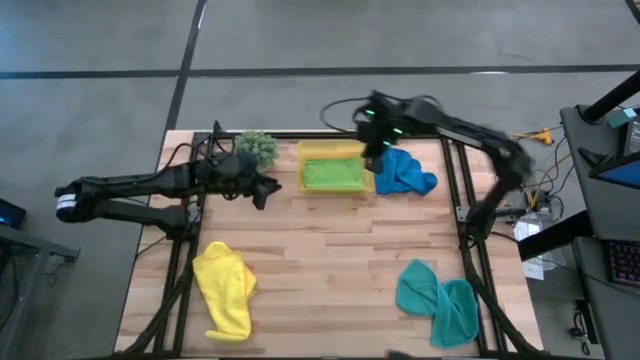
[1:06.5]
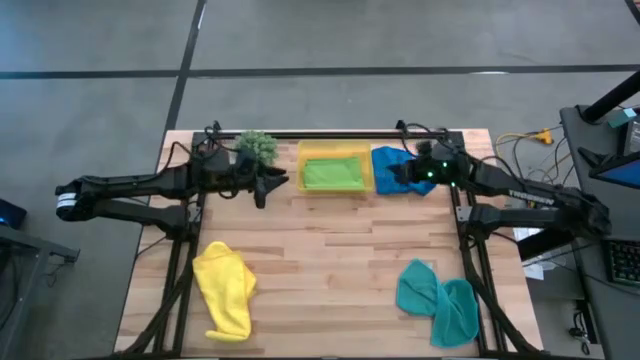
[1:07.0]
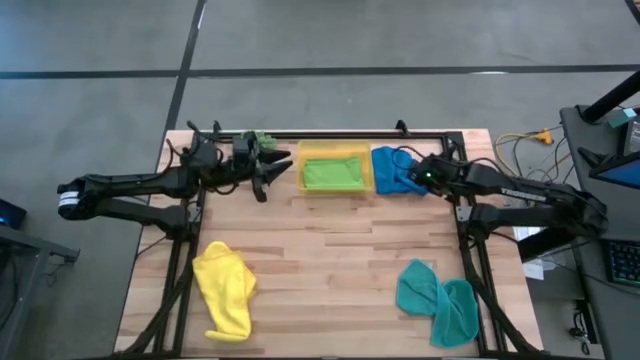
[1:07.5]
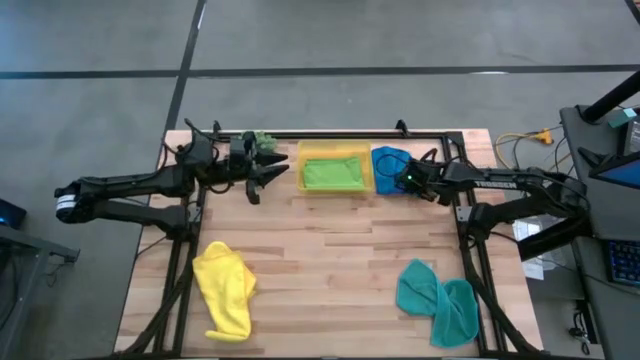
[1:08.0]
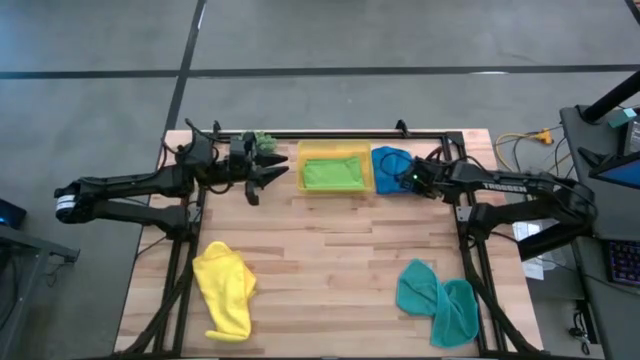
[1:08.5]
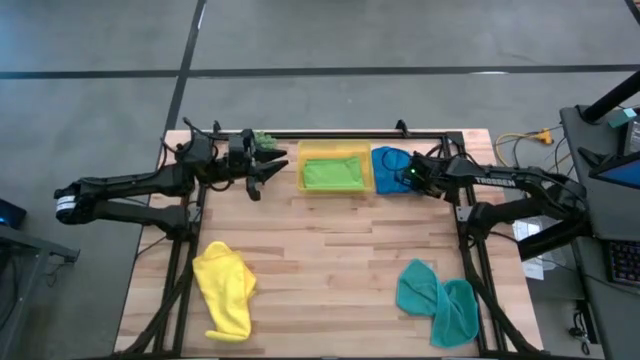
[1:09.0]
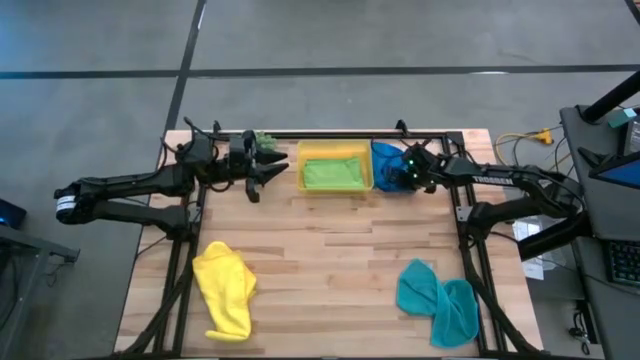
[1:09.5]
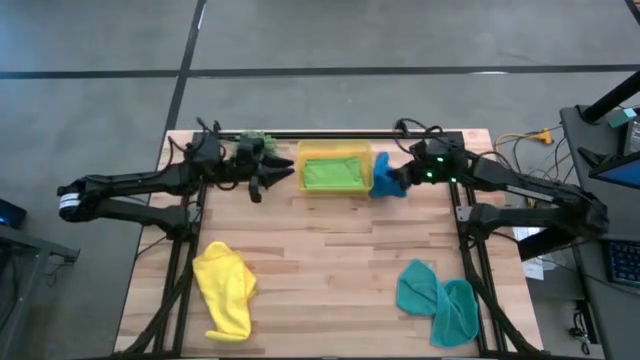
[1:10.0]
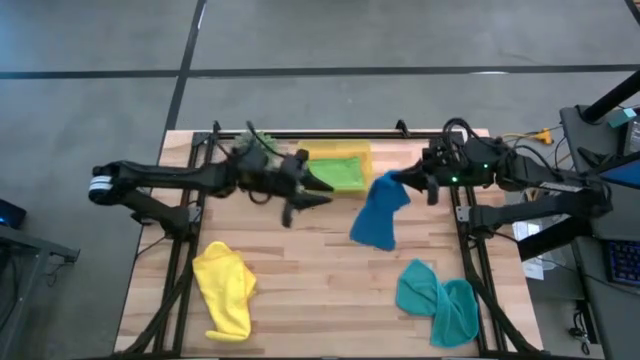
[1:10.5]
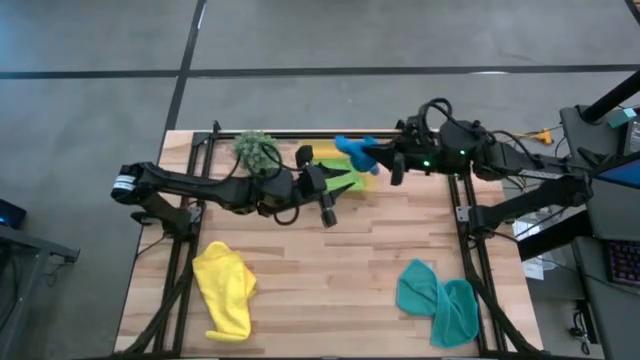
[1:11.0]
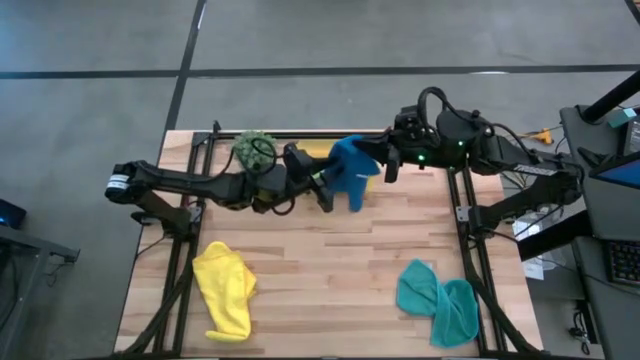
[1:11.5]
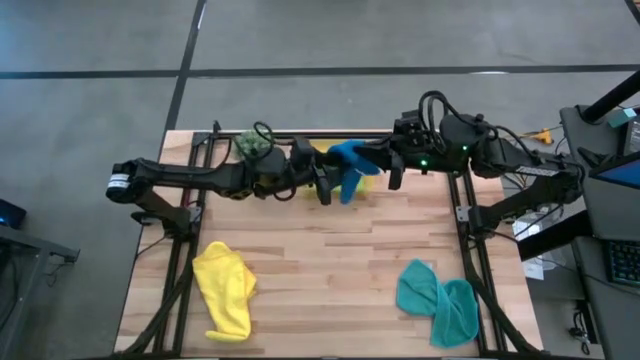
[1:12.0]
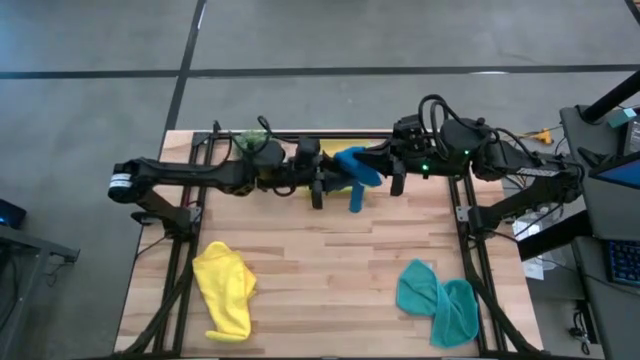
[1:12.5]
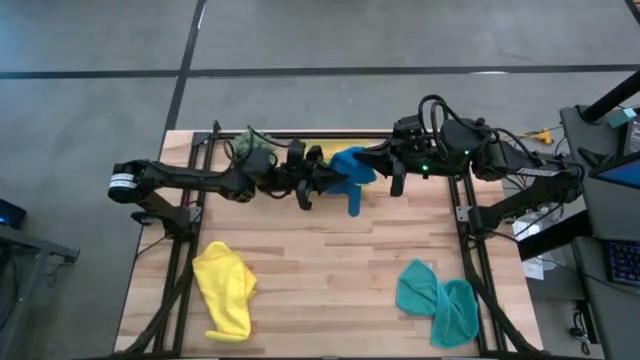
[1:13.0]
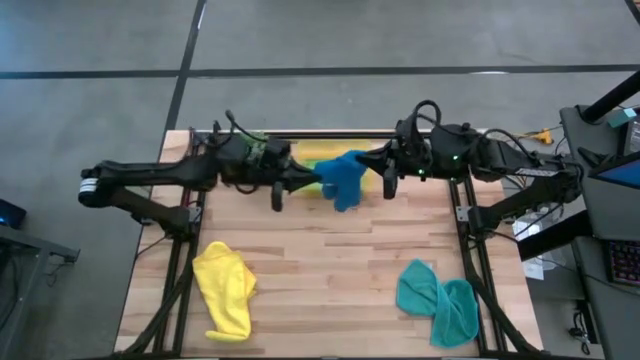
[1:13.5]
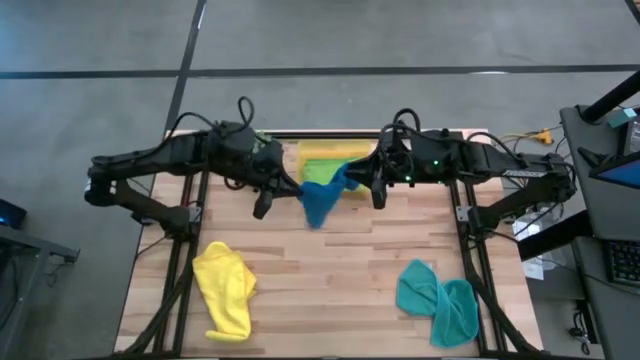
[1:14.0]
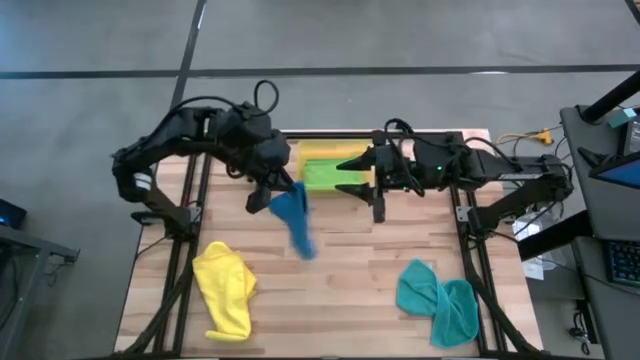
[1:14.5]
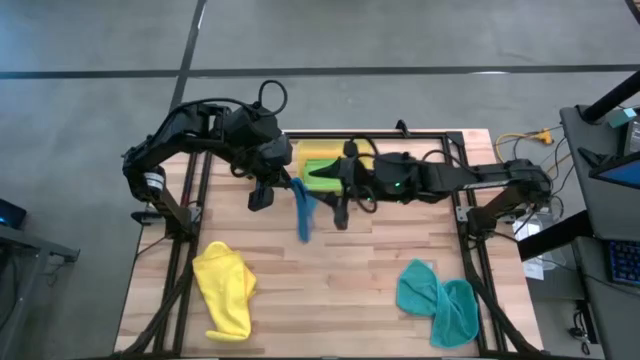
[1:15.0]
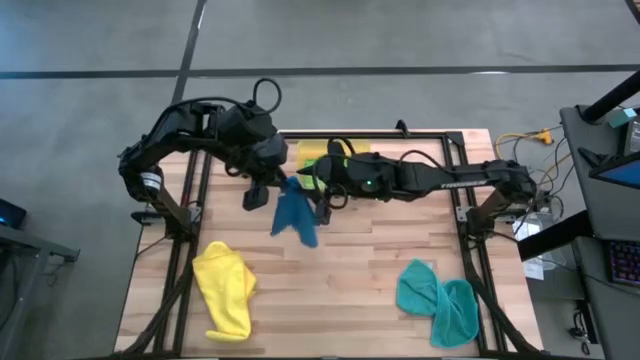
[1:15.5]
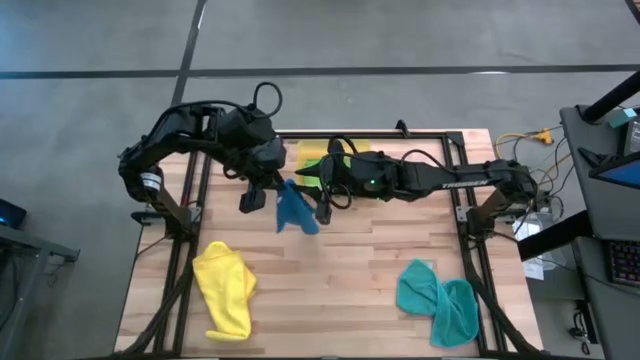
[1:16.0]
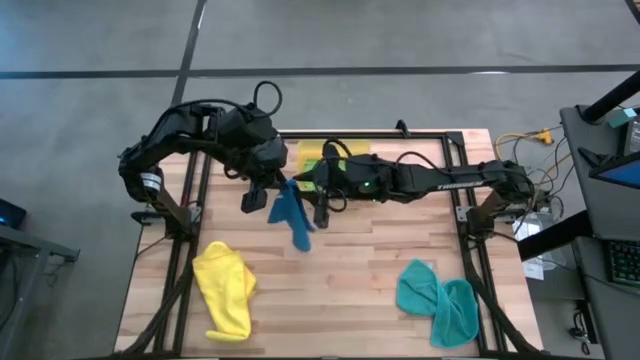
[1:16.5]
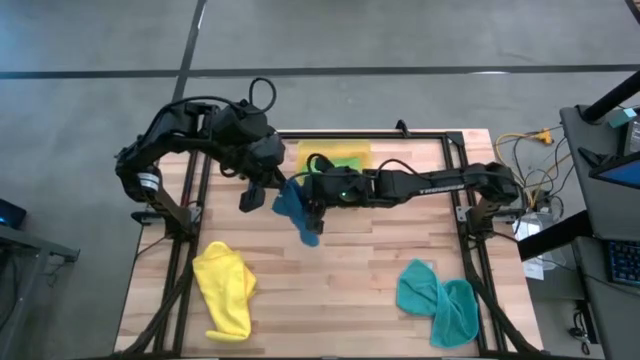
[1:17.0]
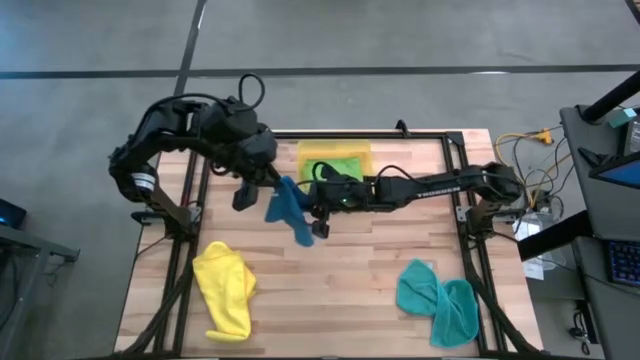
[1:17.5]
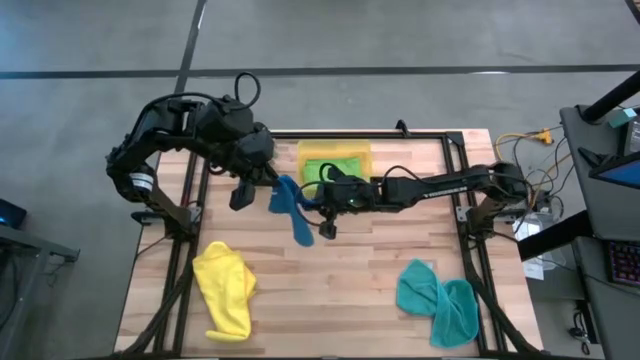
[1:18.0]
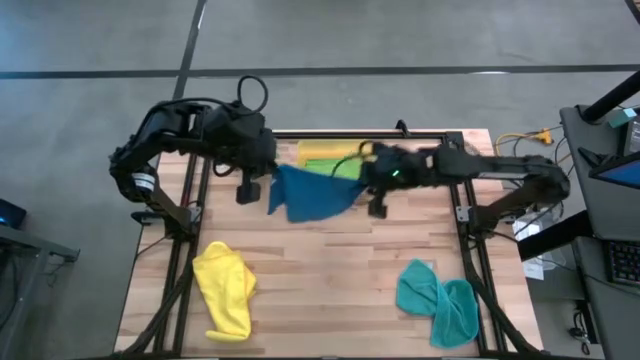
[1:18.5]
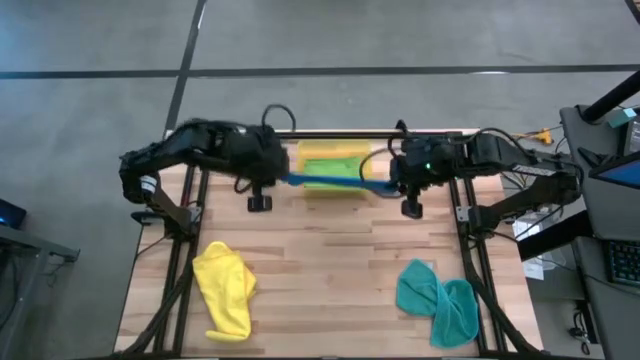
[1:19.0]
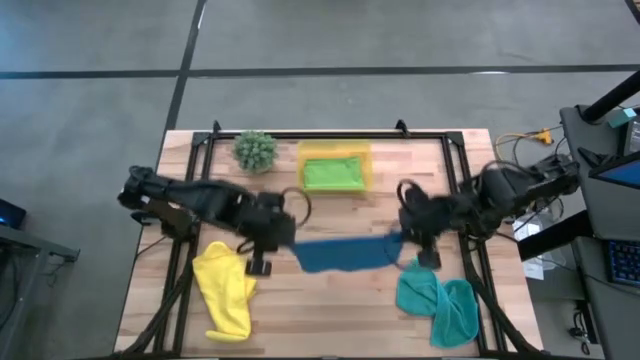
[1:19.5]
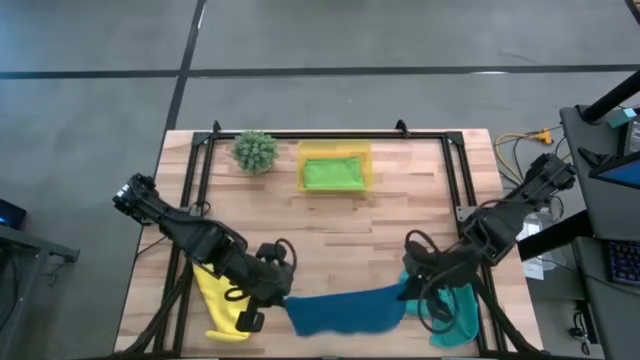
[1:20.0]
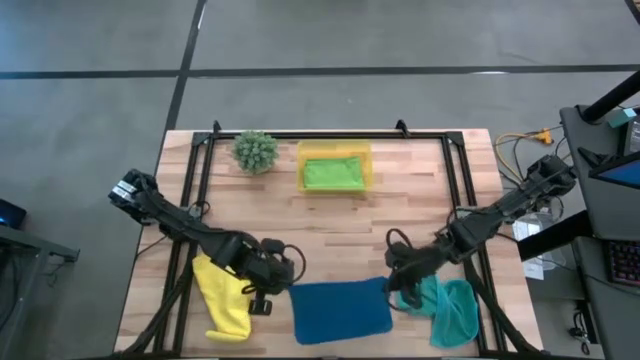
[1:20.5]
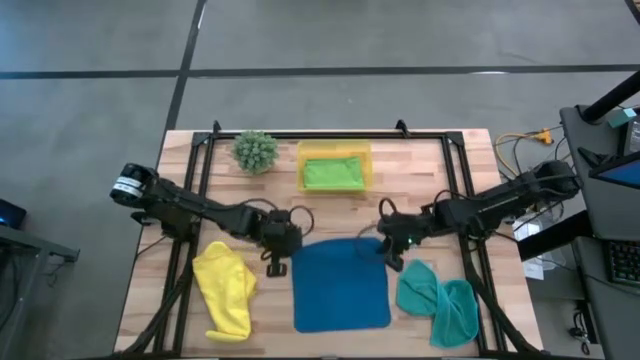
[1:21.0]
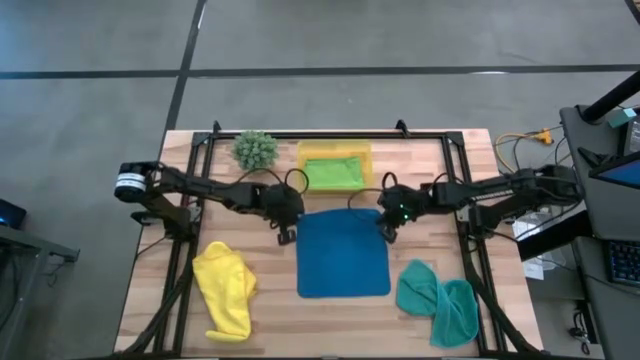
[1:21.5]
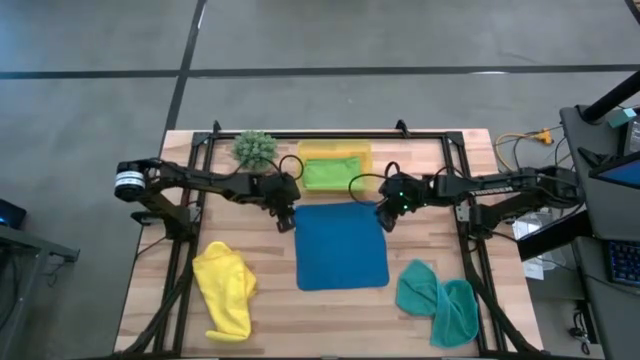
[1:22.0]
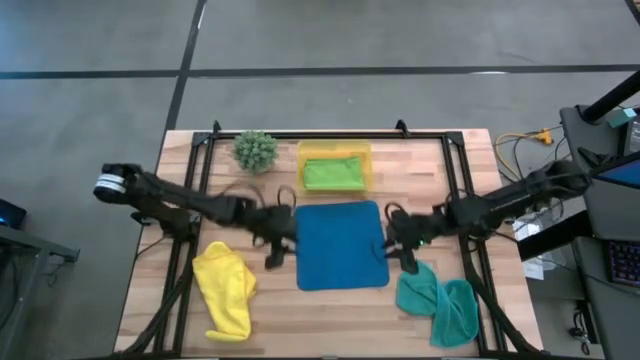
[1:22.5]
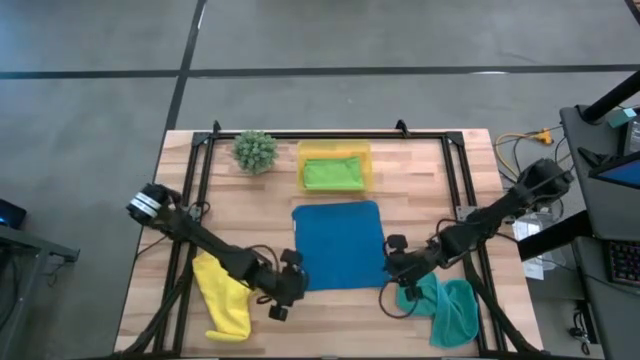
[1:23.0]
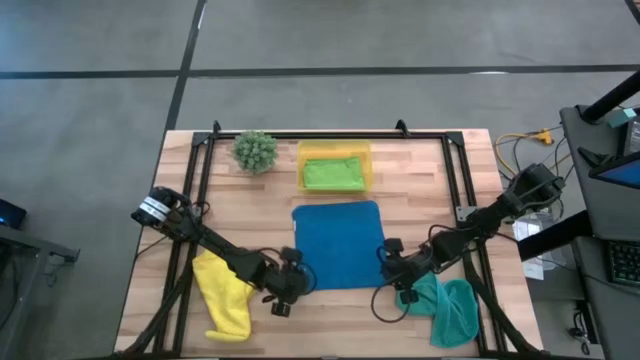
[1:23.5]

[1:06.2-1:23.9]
Task: Fold microfiber towels
Fold the blue towel

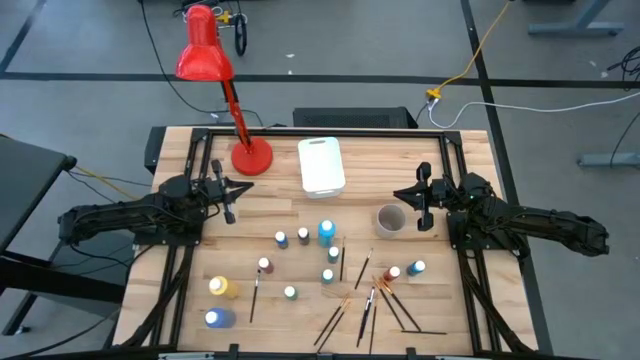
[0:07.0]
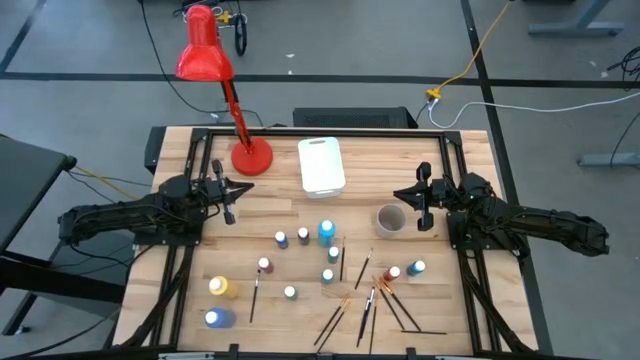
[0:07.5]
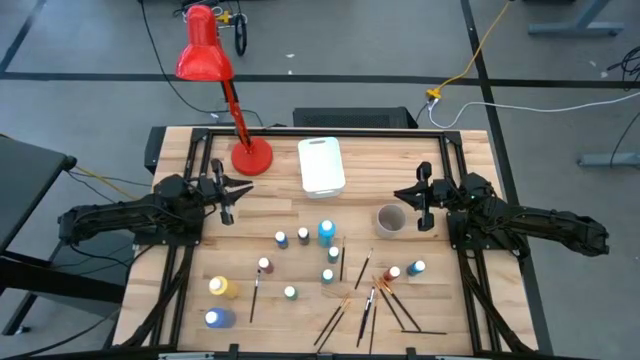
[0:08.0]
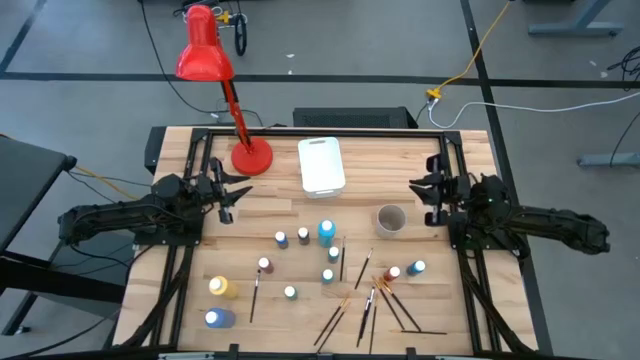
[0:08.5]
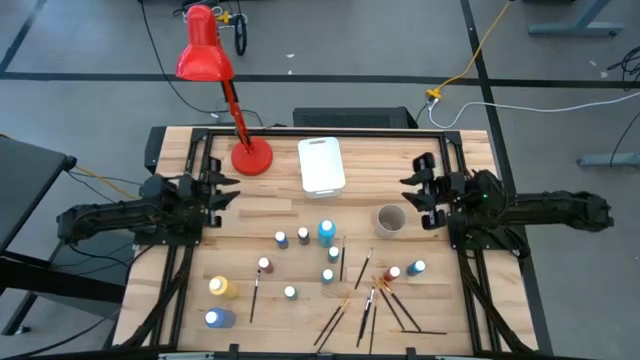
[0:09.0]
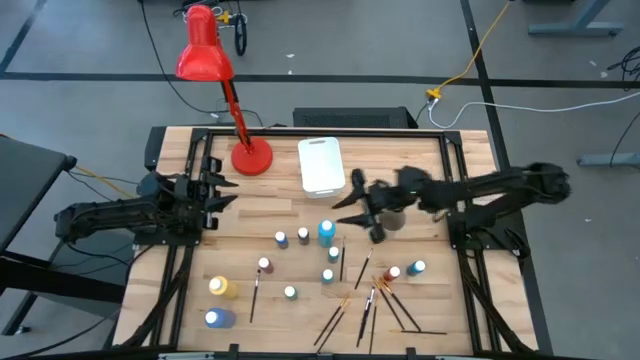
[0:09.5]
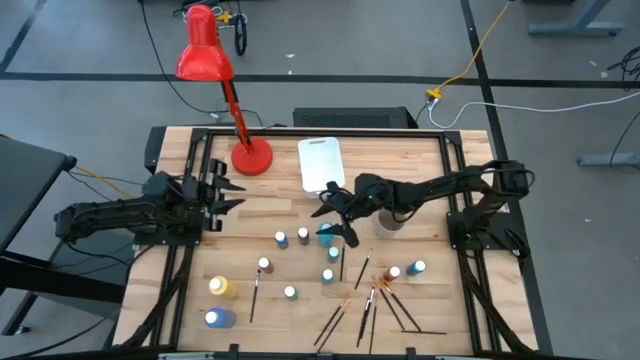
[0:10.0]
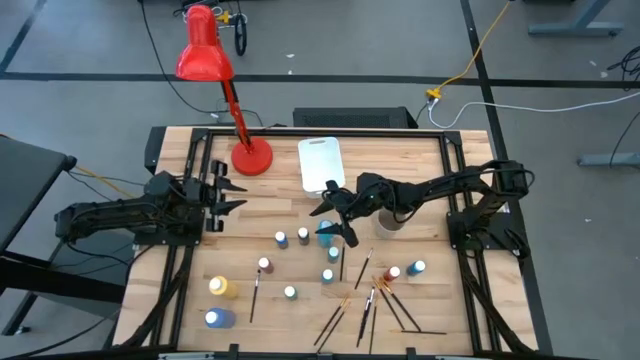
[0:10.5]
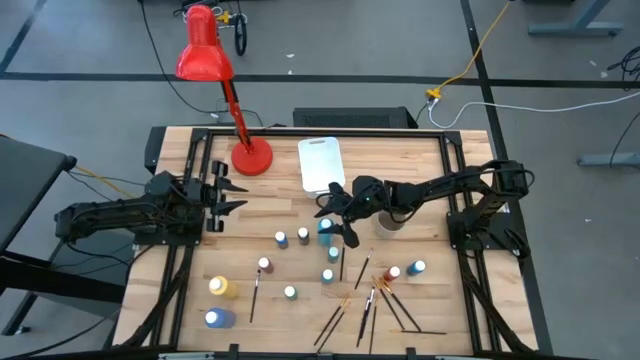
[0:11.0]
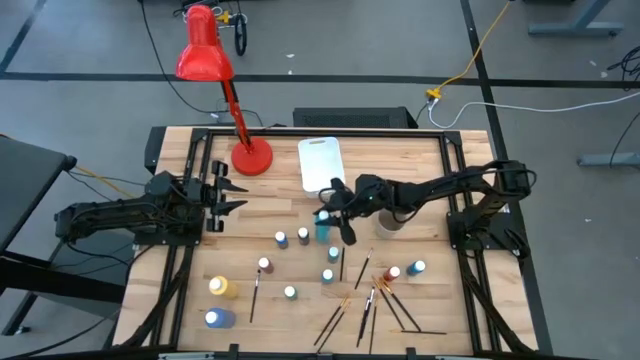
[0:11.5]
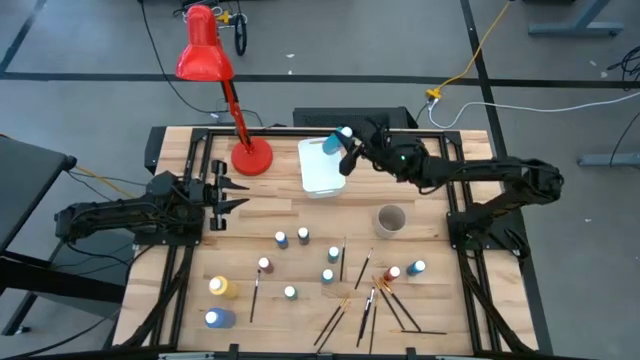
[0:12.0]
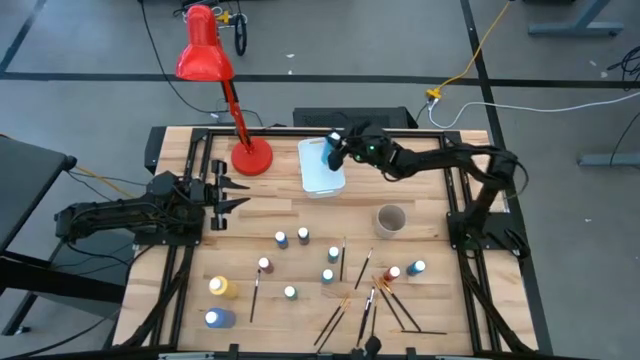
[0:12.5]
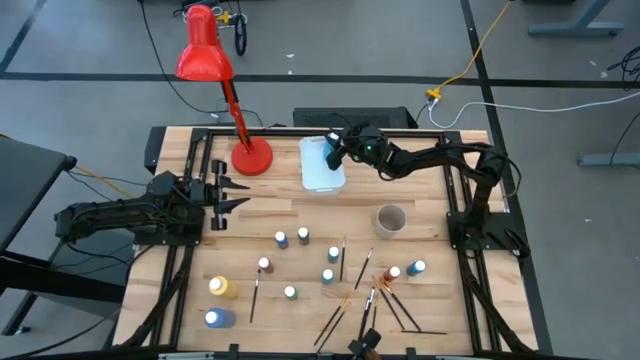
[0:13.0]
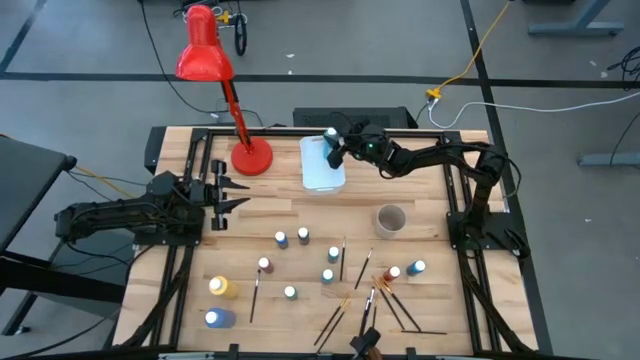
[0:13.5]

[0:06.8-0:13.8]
Task: Pick & Place Paint Supplies
Put the large light blue paint bottle into the white bin
